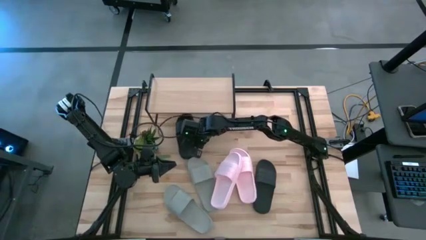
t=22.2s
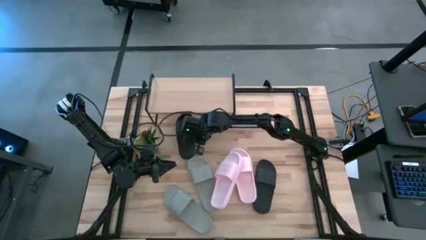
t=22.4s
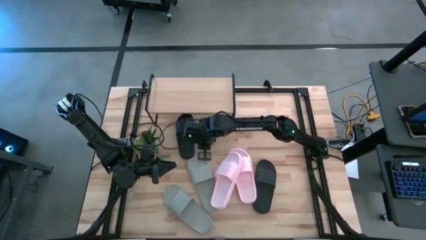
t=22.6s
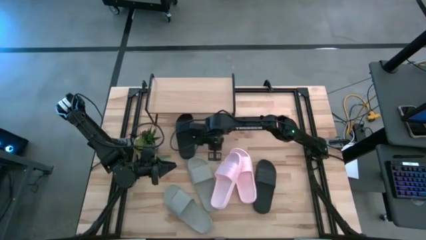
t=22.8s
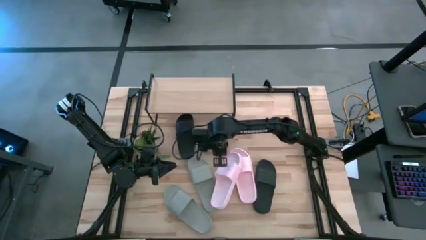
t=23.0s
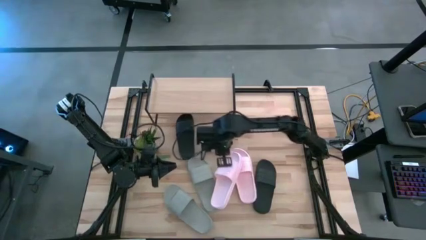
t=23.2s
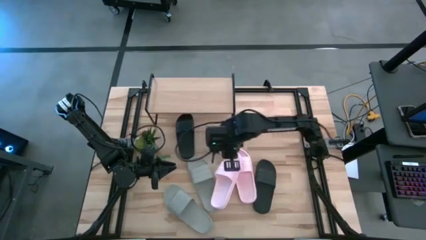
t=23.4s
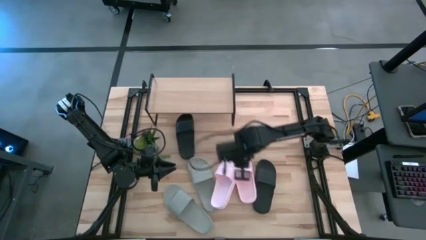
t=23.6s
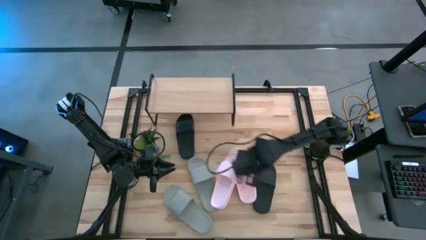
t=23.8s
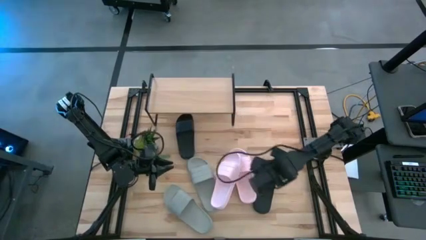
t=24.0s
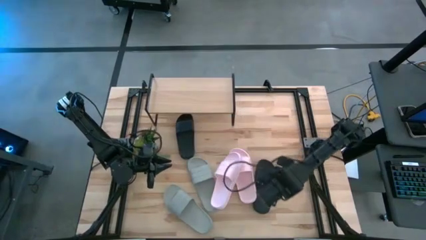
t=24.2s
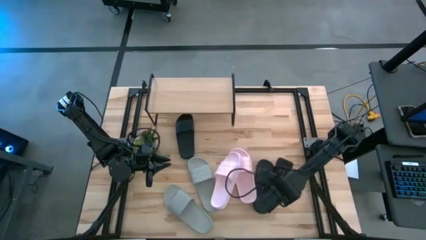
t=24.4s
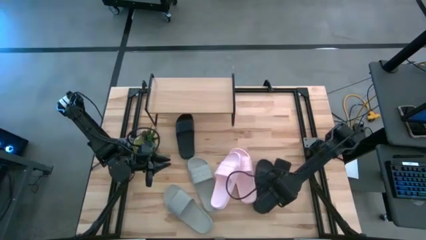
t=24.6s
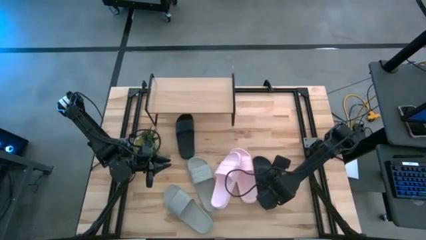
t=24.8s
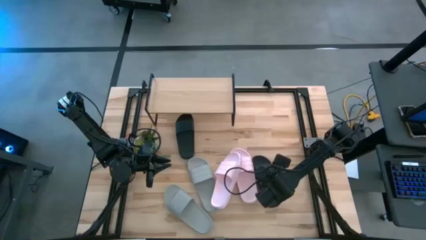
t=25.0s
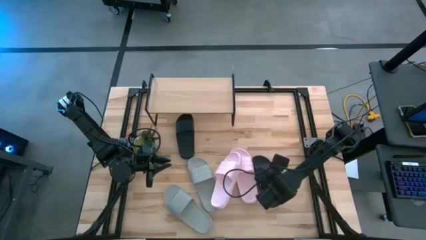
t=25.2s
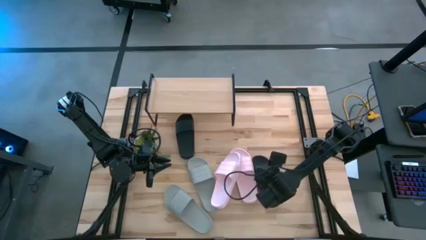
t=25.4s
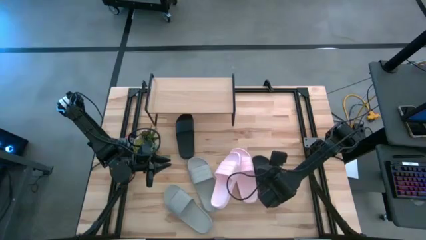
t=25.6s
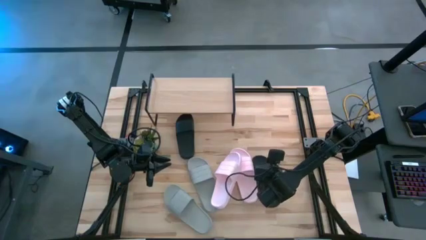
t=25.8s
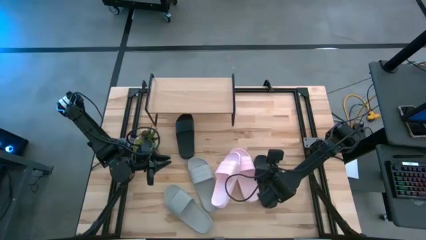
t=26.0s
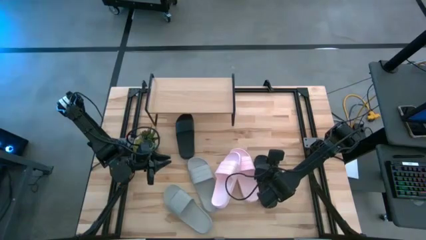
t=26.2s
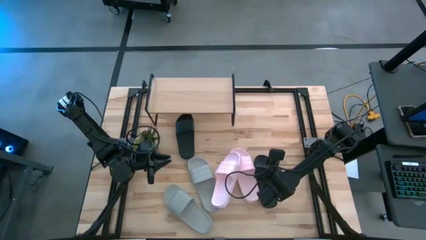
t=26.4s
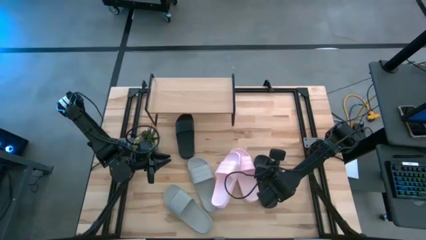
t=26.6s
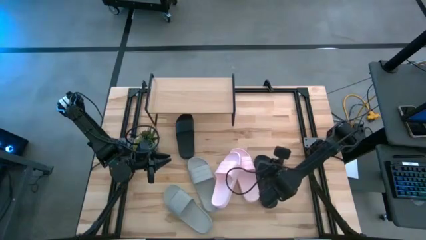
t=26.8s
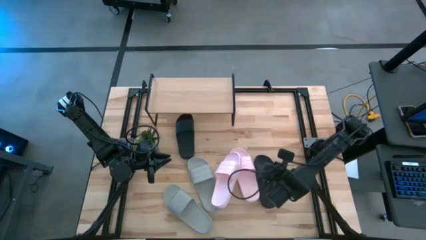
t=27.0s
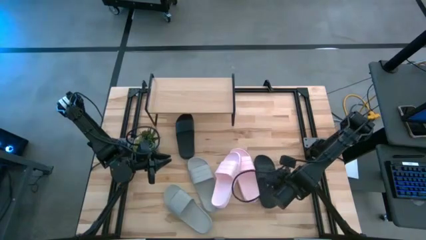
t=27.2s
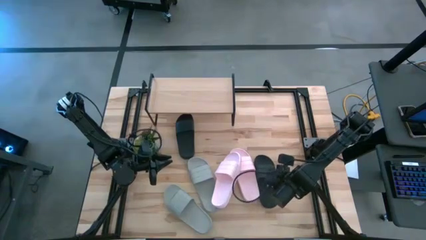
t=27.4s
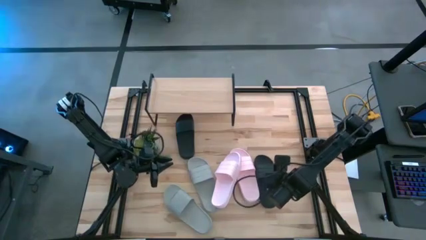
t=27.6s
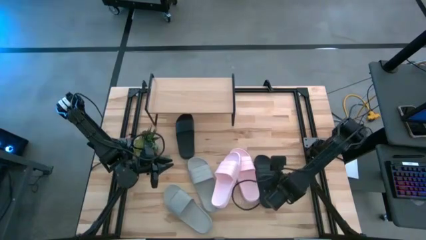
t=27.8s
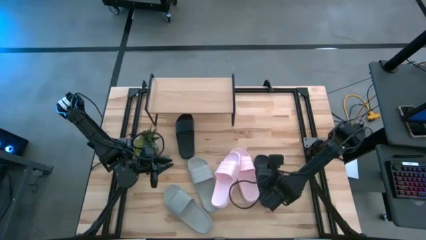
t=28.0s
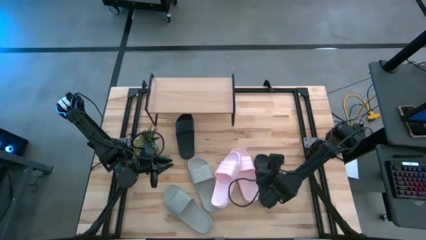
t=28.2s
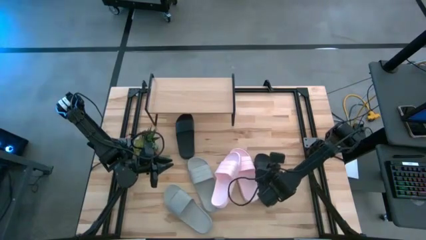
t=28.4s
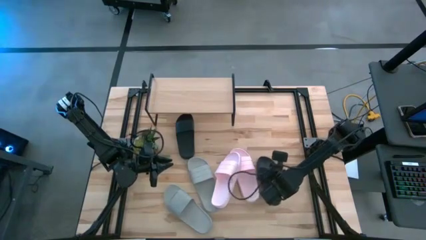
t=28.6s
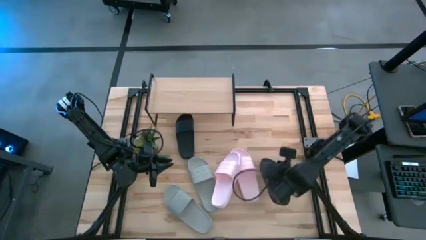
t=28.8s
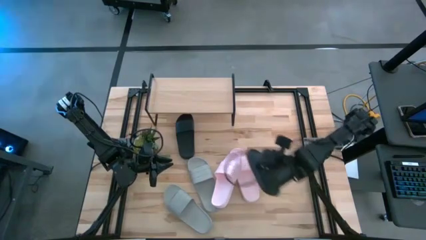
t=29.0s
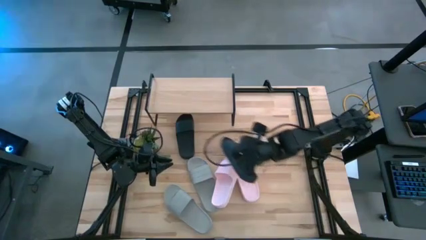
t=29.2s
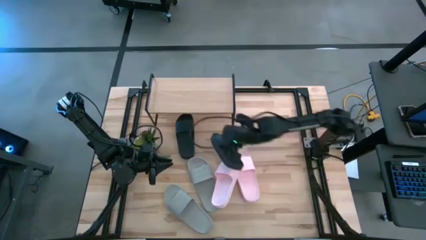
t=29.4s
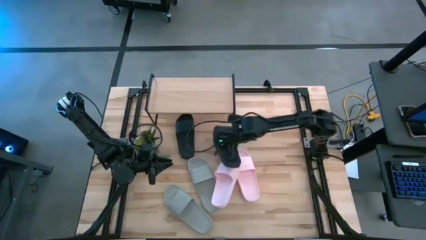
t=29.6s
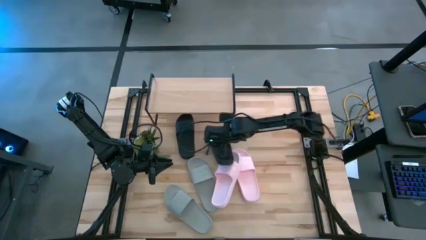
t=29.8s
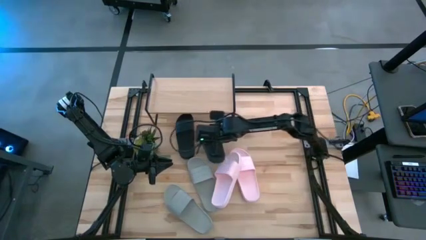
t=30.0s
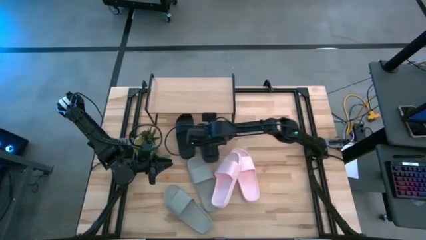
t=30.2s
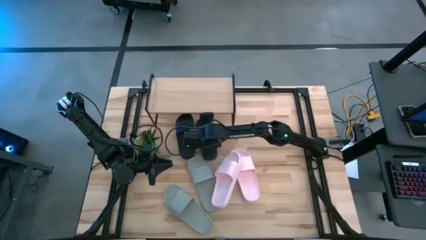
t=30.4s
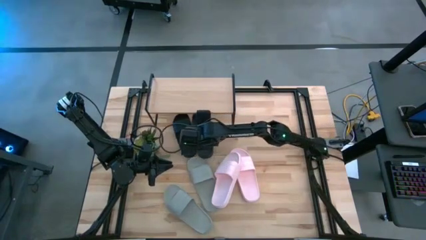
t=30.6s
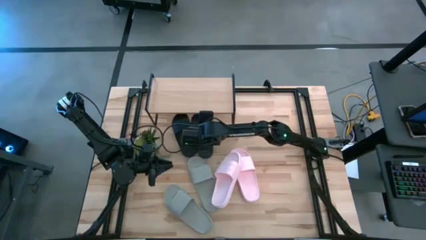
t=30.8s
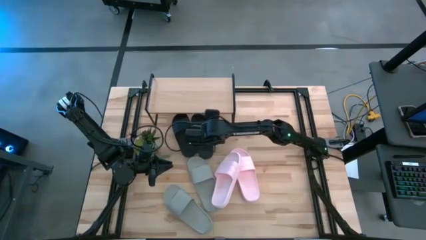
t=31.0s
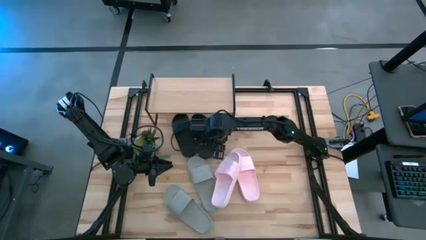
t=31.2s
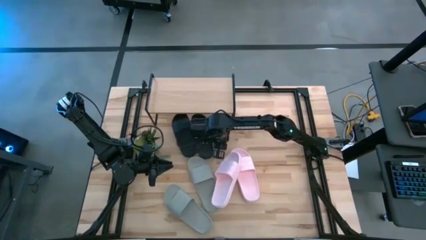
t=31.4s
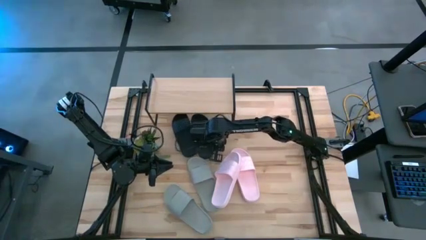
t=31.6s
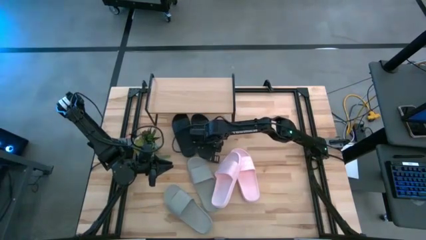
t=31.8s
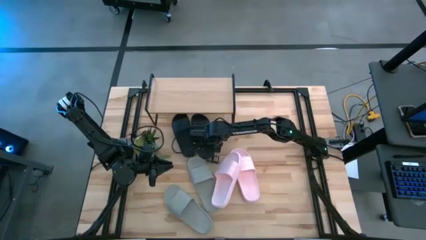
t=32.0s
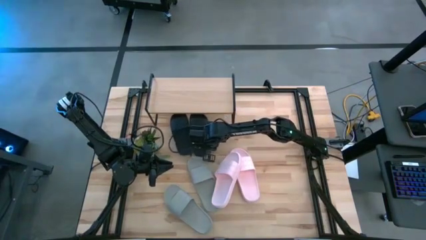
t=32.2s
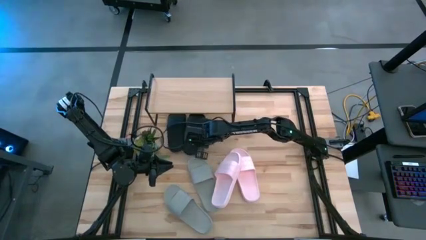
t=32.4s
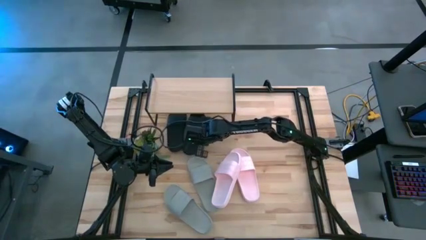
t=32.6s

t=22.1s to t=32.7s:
Task: Pick and place slides into the shelf
Move the black slider under the shelf

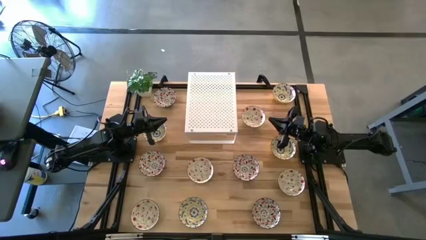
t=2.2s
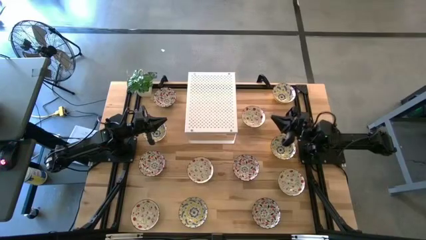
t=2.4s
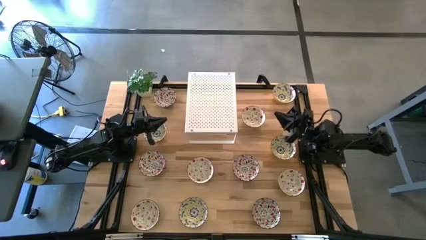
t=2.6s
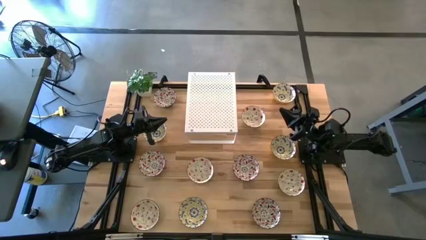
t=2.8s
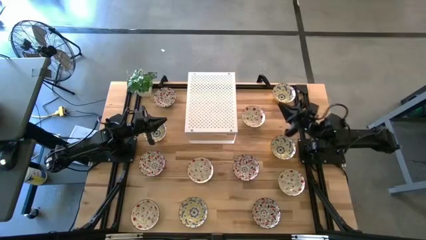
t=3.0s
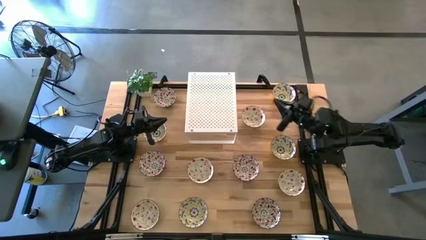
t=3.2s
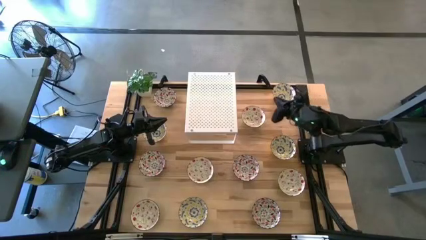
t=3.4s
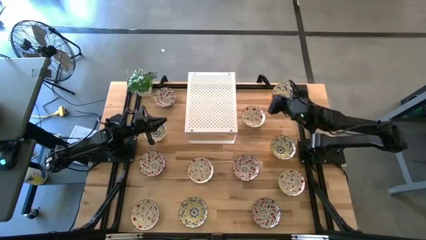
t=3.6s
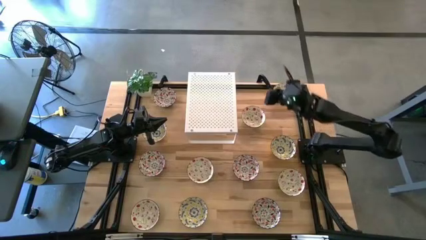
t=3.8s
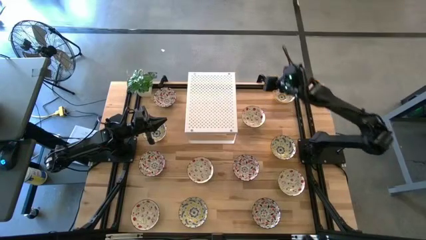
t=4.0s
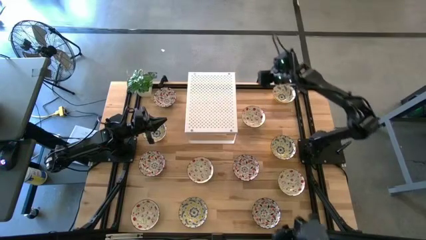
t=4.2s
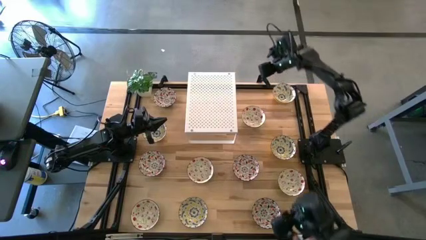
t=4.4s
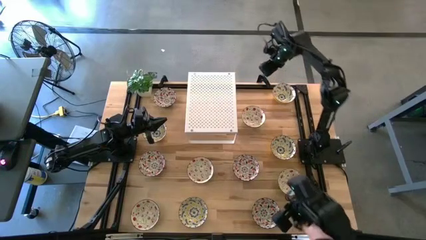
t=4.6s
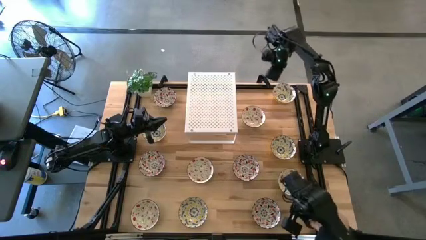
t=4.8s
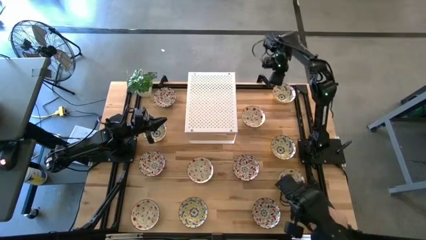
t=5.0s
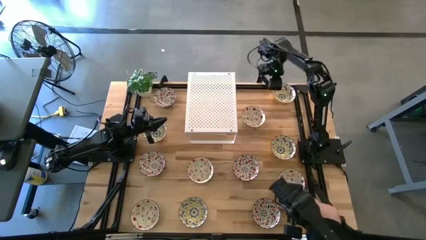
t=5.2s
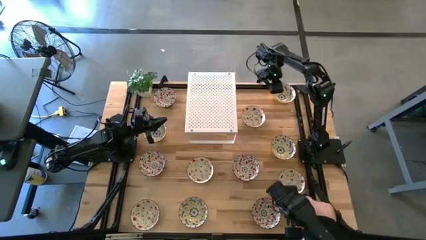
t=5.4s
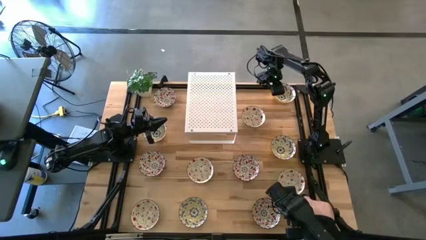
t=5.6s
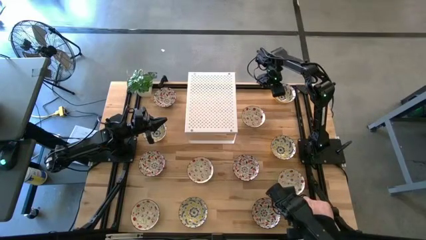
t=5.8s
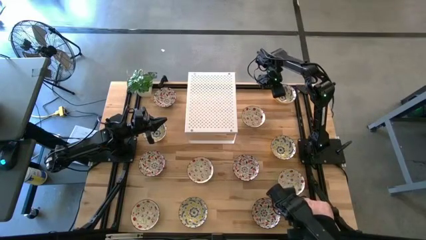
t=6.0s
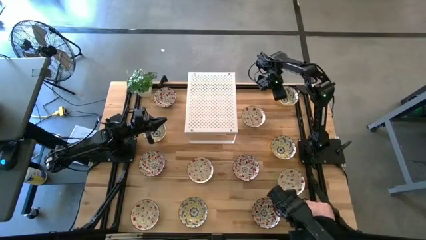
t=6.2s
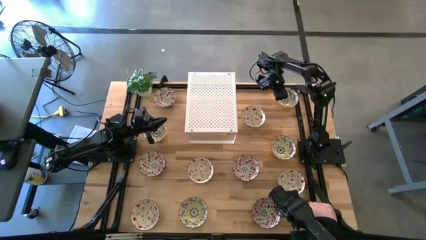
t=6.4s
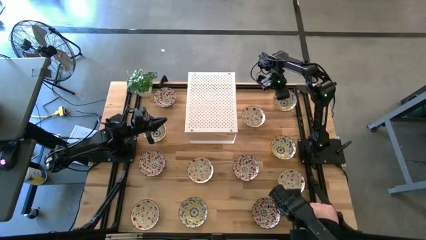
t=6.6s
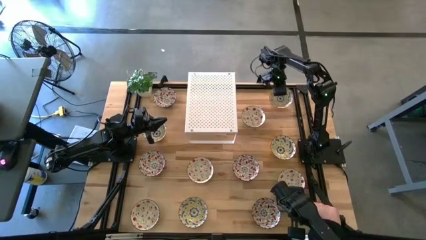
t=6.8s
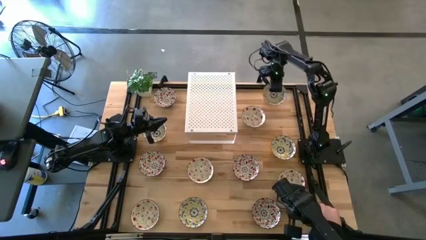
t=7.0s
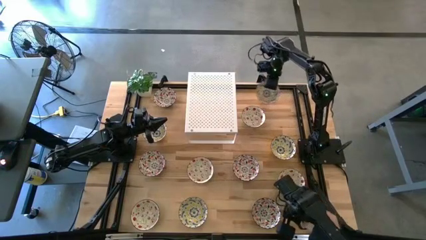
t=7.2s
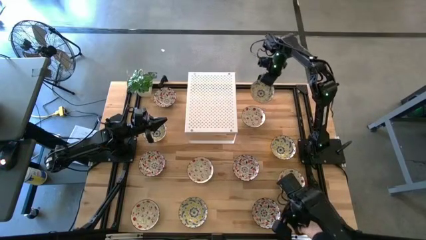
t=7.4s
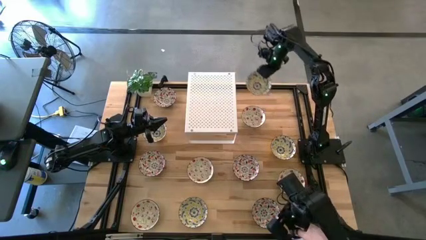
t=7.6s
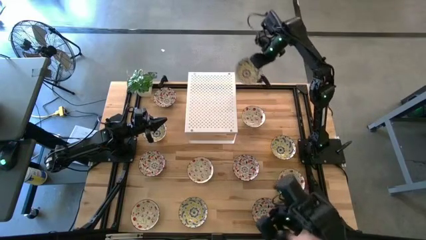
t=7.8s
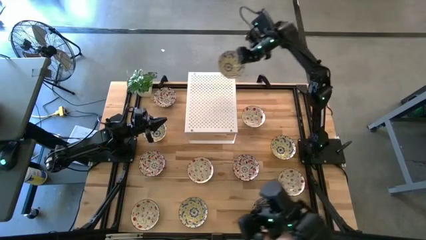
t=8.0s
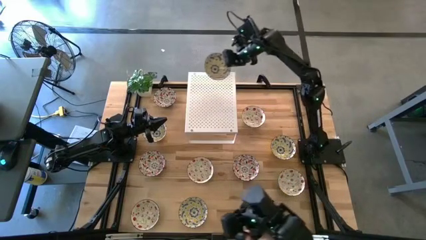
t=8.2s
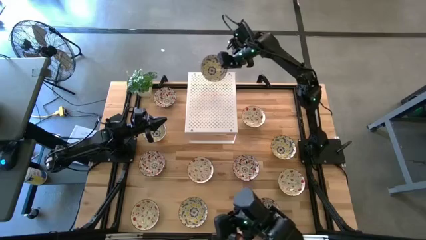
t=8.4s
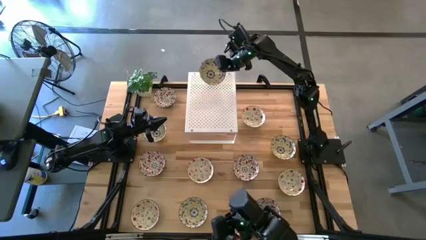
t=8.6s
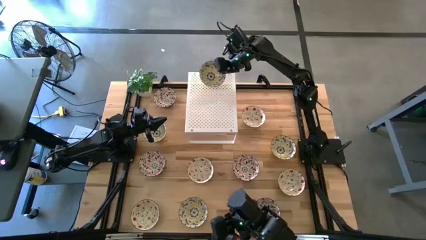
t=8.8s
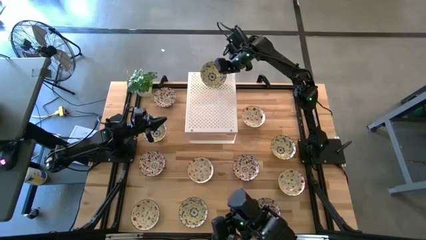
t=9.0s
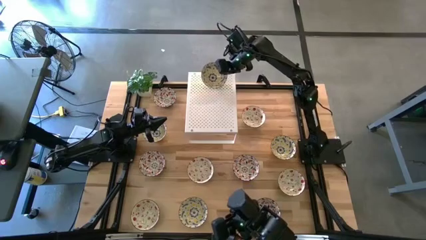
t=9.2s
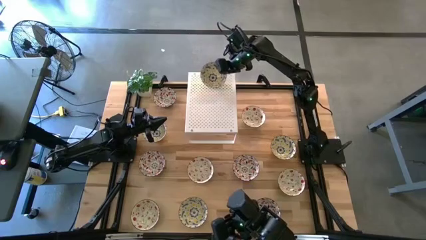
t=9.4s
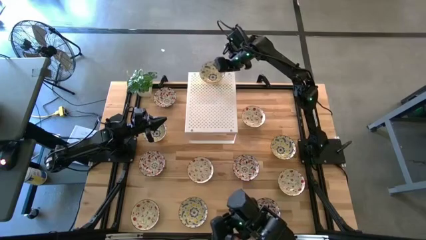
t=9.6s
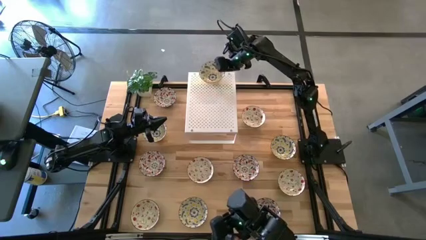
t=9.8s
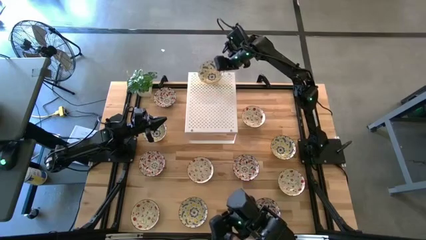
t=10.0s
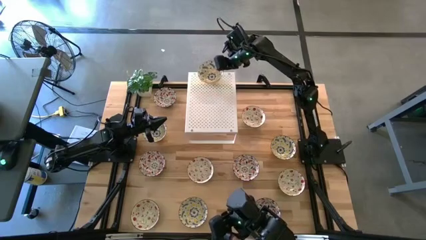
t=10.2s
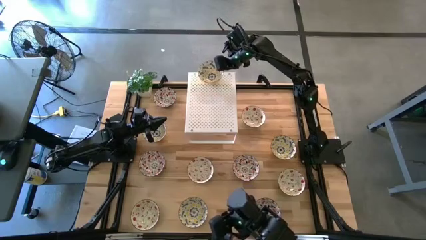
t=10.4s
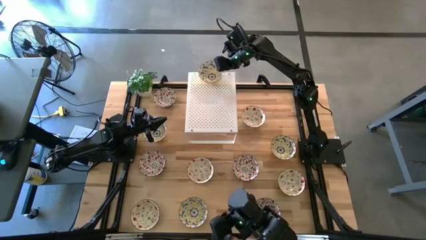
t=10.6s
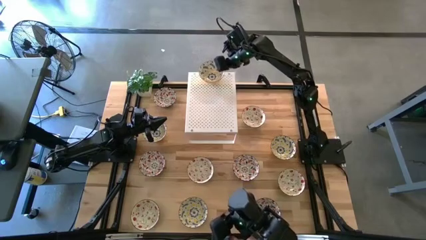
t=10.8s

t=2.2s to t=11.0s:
Task: Pick & Place Mini bowls
Put the yellow patterned bowl on the shelf
